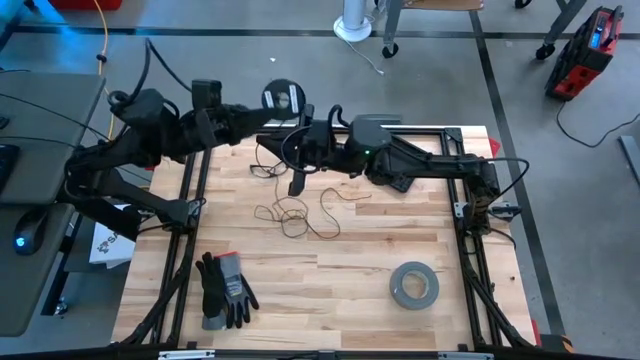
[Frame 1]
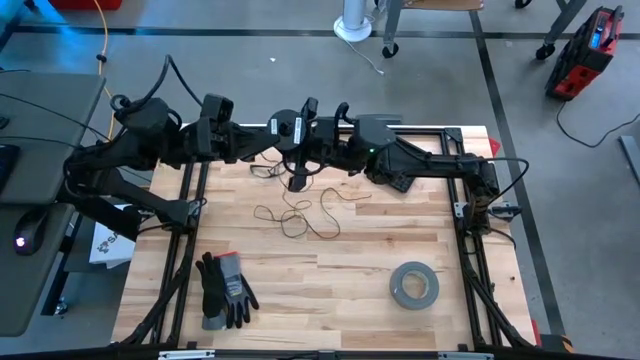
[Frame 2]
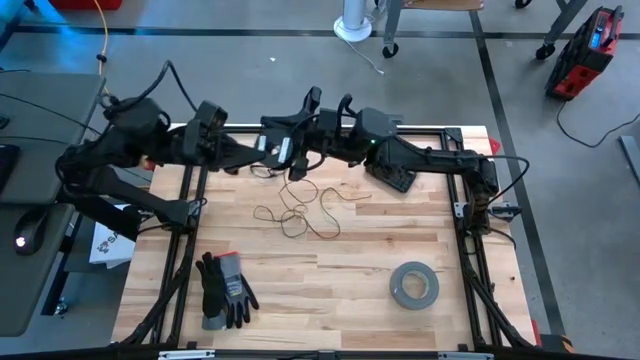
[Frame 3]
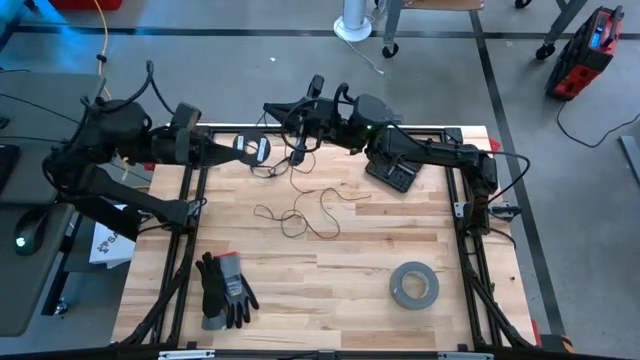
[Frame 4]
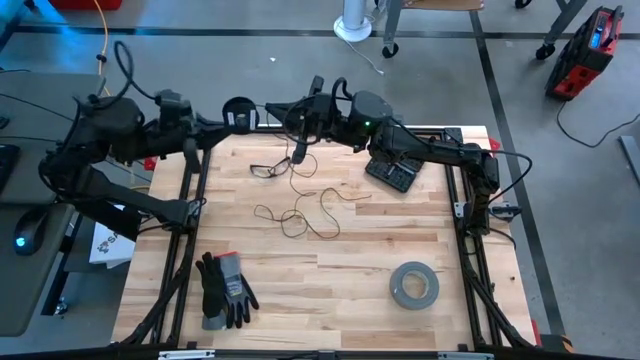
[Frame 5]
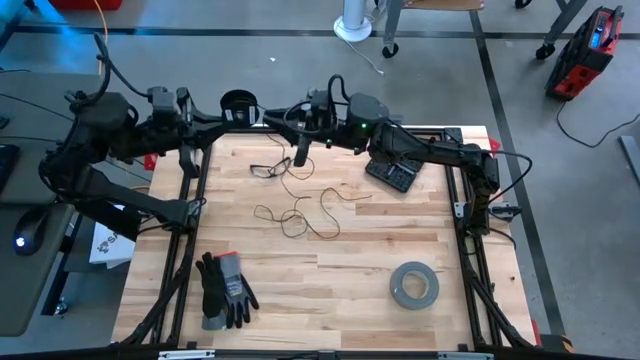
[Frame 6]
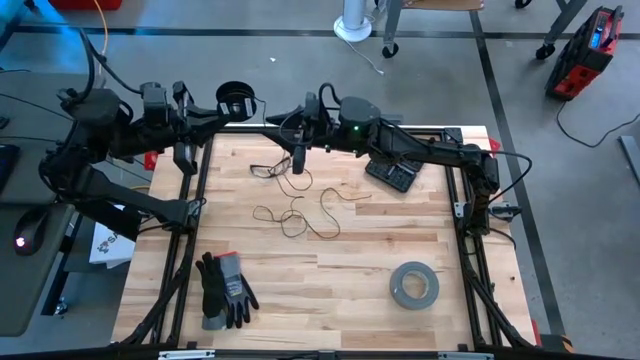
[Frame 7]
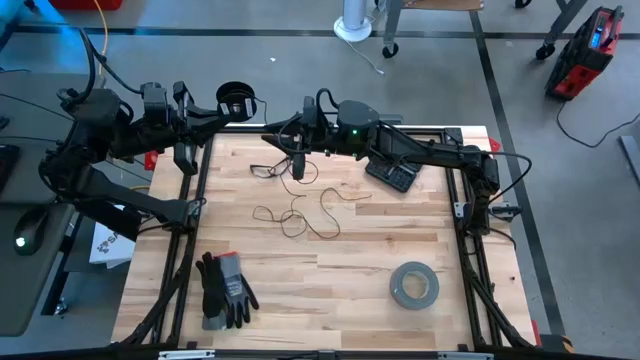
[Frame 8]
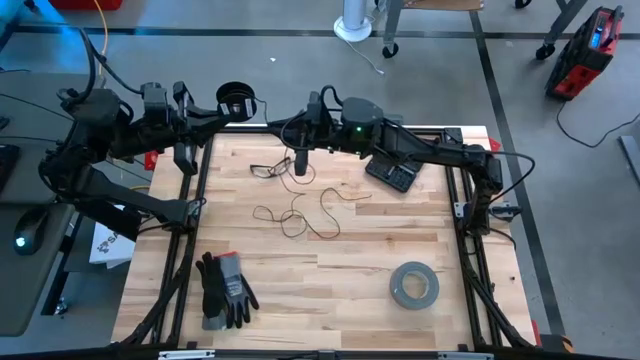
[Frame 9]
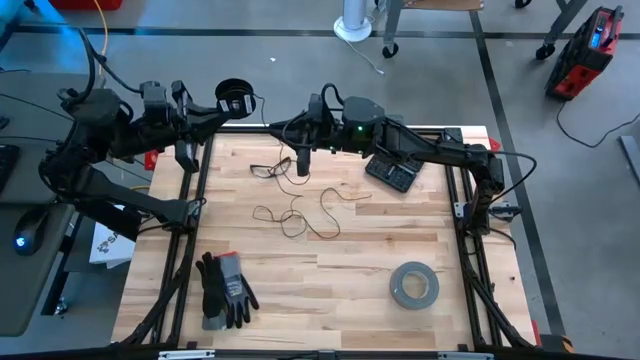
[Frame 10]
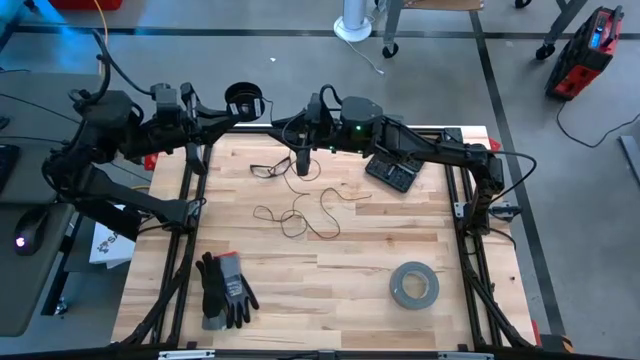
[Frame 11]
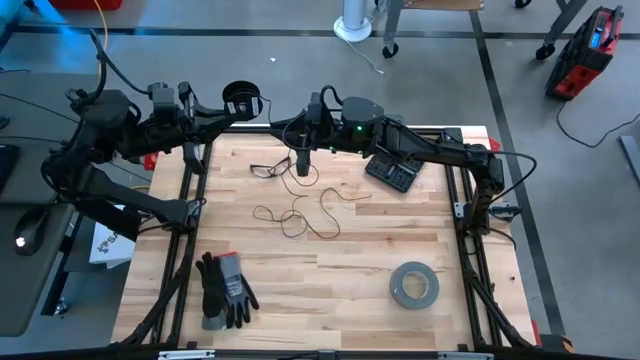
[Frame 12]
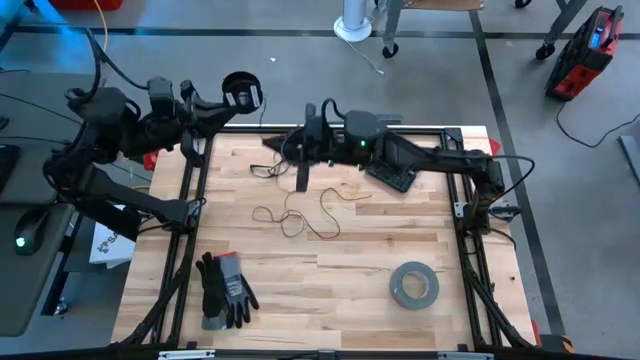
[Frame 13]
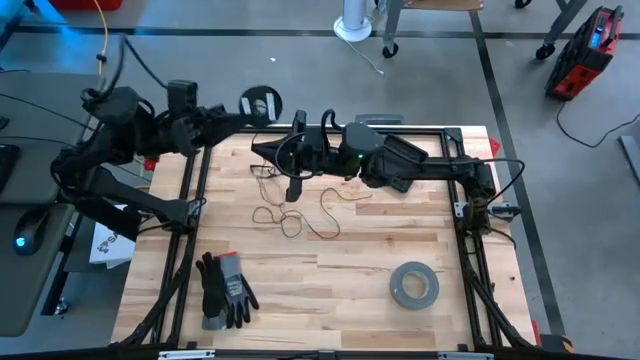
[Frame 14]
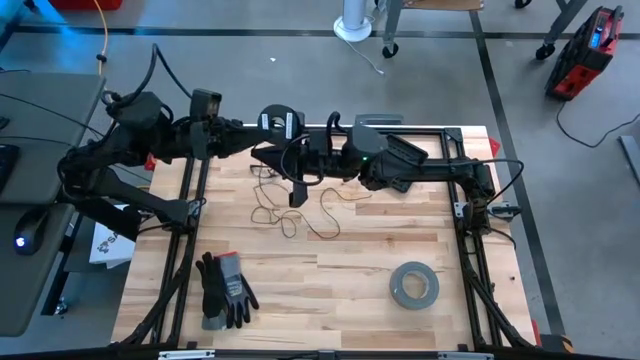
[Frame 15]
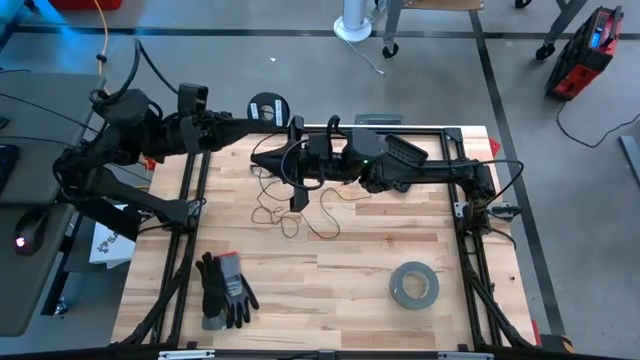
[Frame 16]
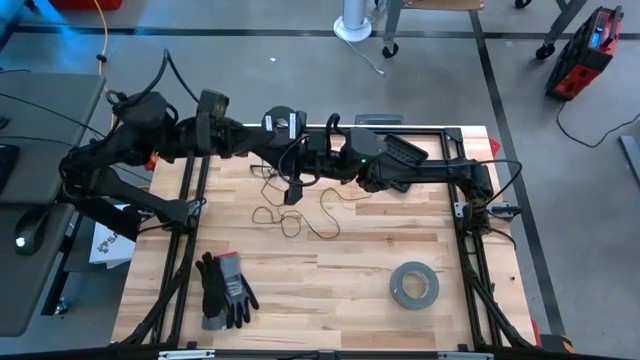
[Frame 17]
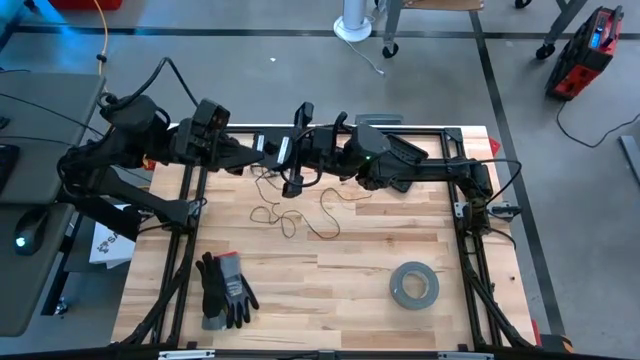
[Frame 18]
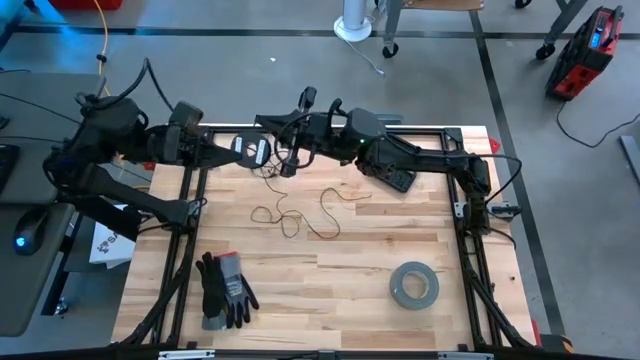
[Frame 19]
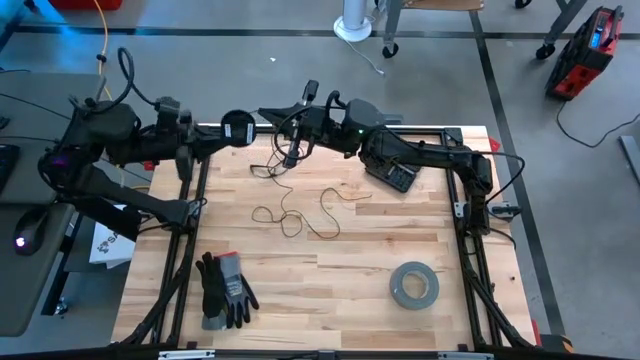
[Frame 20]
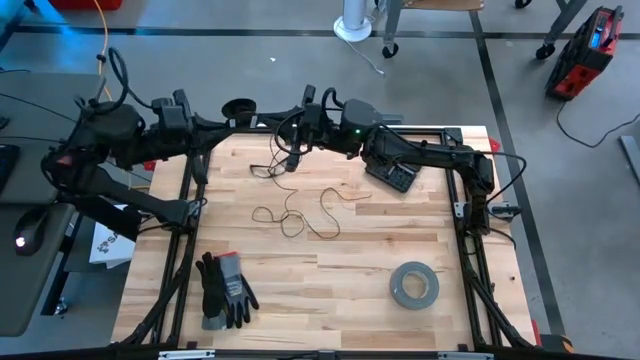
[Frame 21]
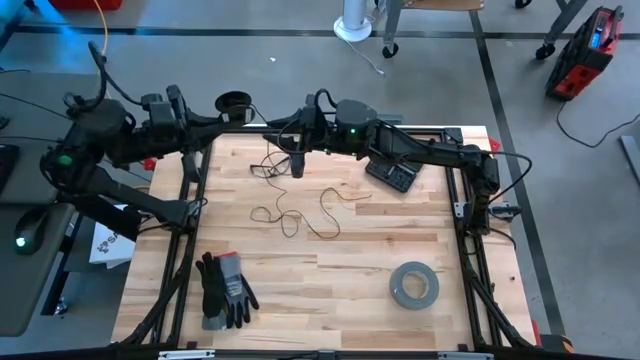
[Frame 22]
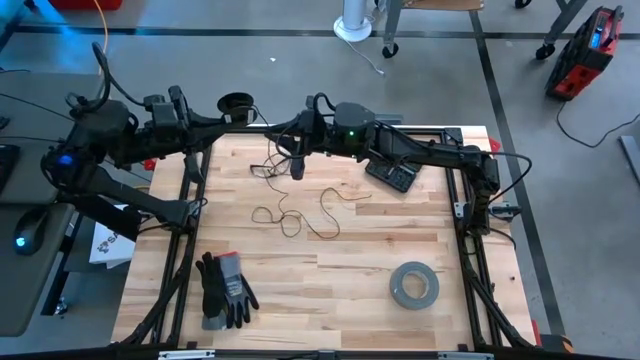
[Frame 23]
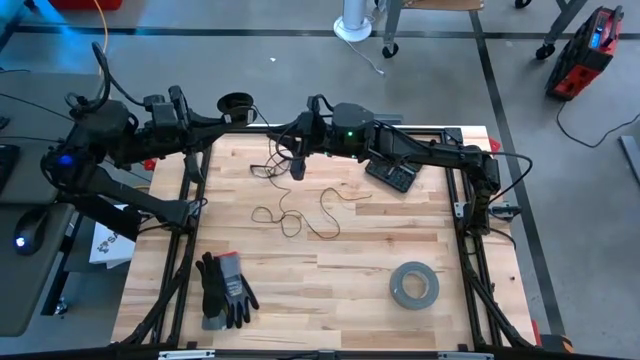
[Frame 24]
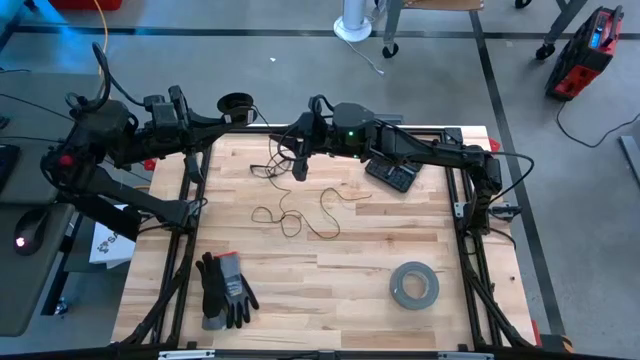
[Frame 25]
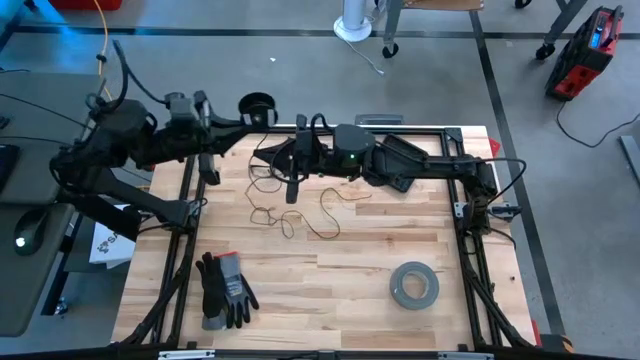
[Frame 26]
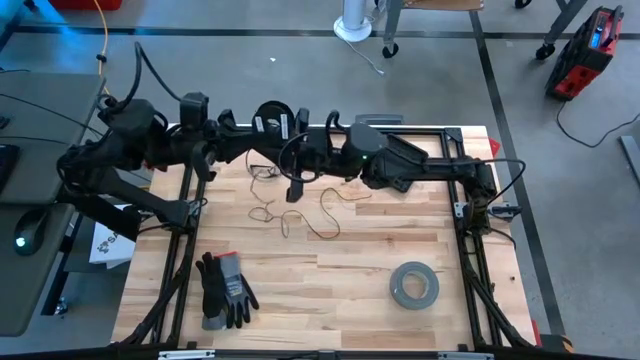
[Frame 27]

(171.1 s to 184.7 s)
Task: Coil cords
Coil the black wire on the black spool

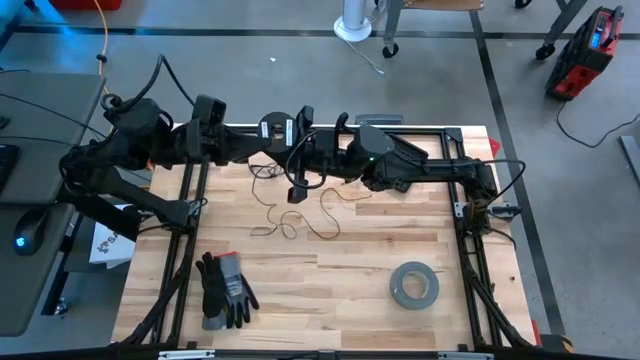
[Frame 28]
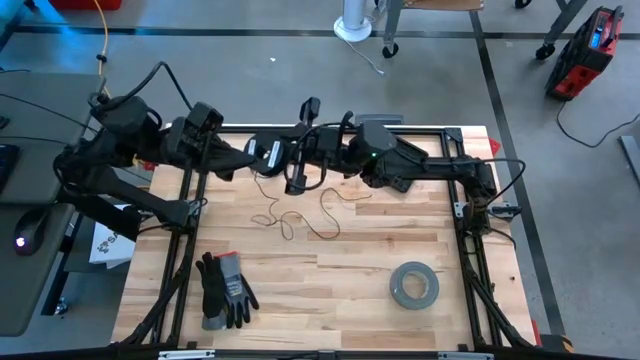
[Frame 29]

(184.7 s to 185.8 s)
Coil the black wire on the black spool
